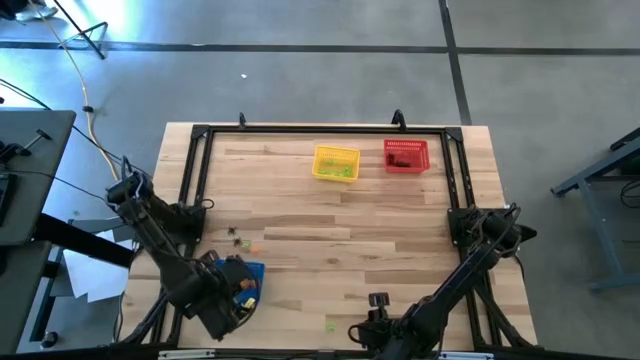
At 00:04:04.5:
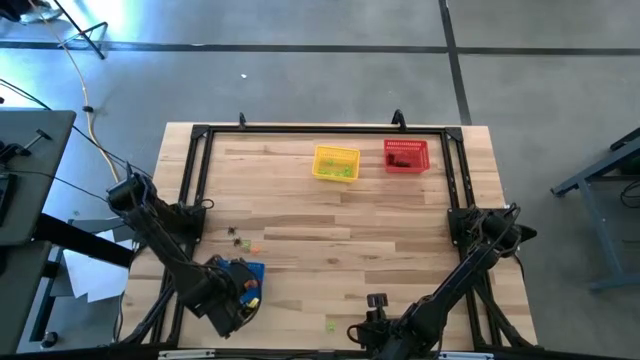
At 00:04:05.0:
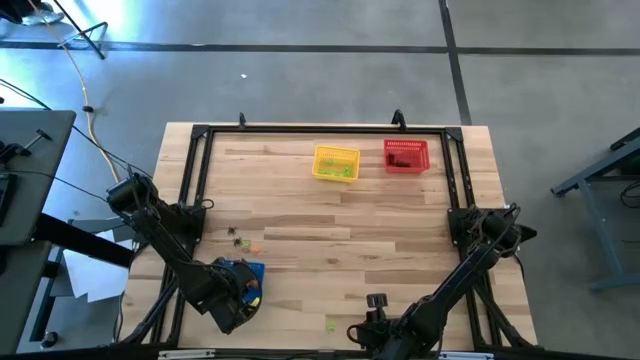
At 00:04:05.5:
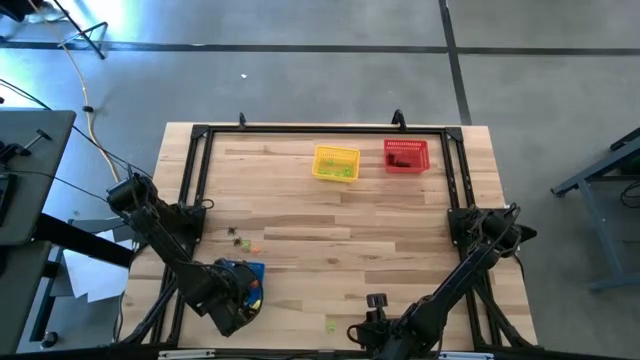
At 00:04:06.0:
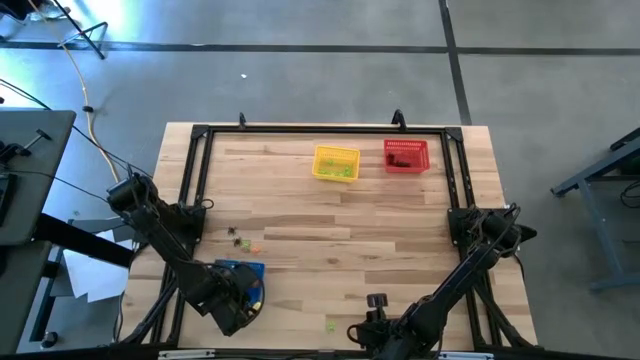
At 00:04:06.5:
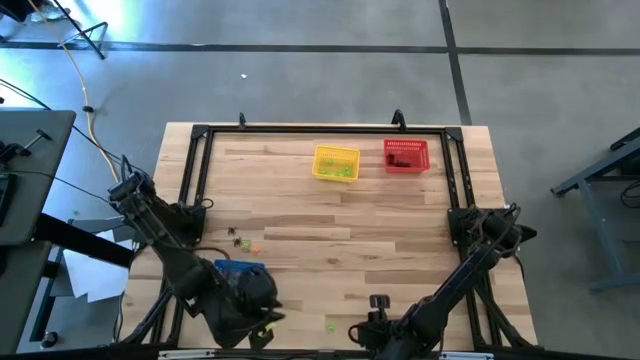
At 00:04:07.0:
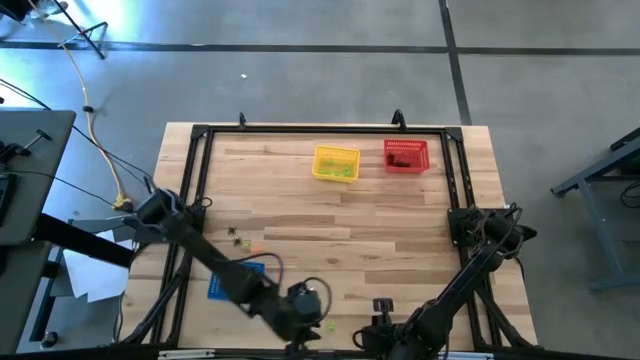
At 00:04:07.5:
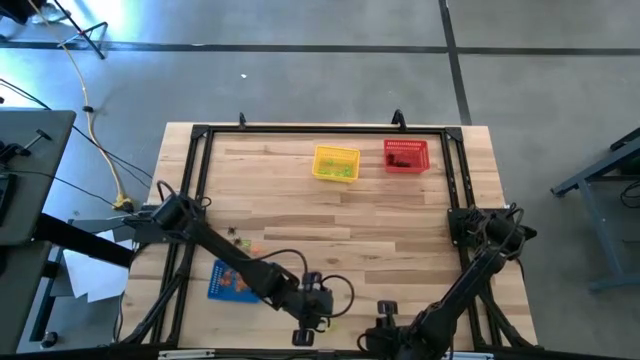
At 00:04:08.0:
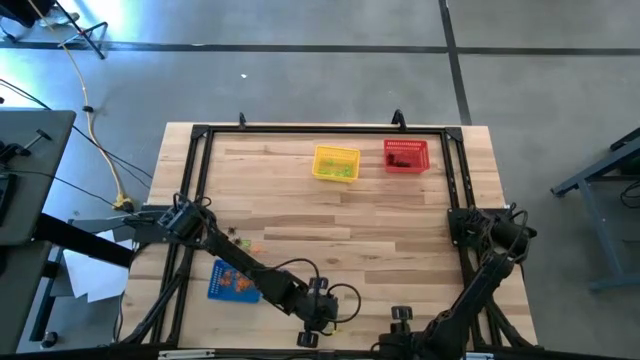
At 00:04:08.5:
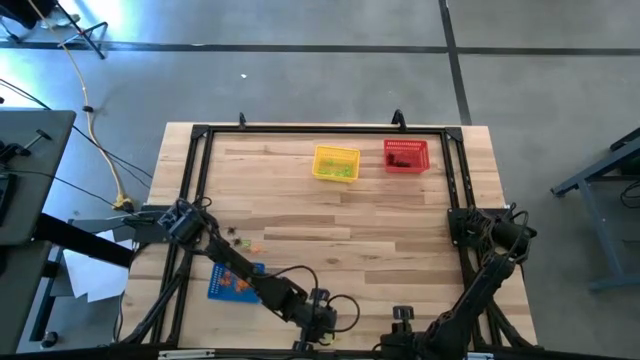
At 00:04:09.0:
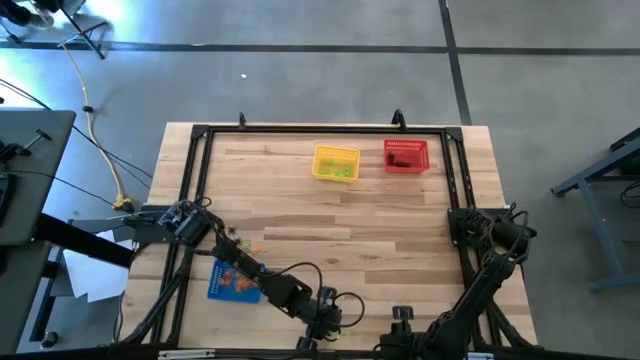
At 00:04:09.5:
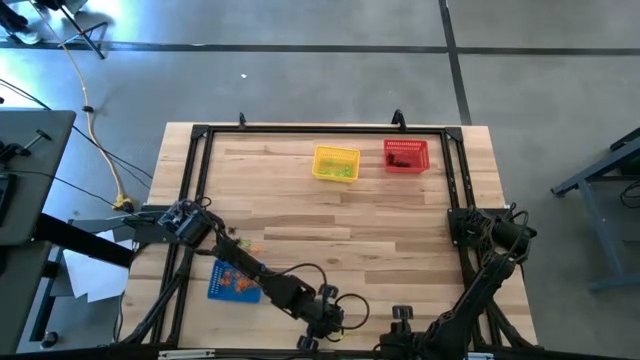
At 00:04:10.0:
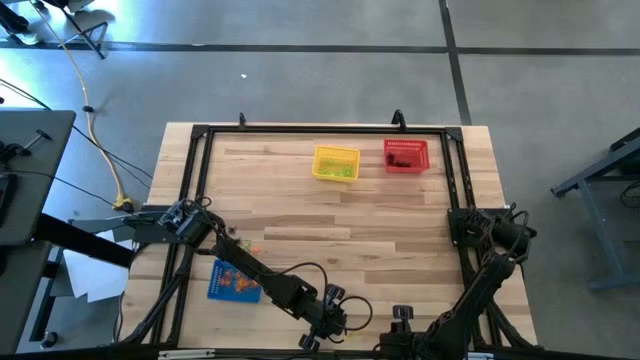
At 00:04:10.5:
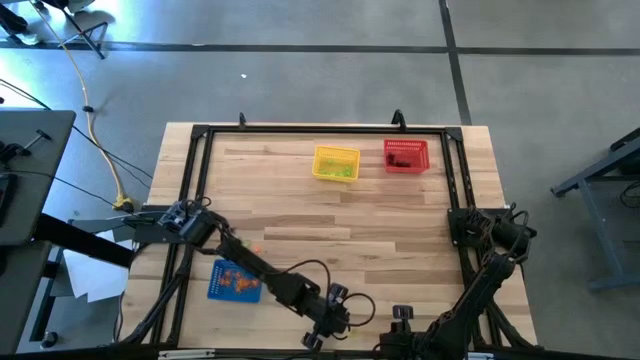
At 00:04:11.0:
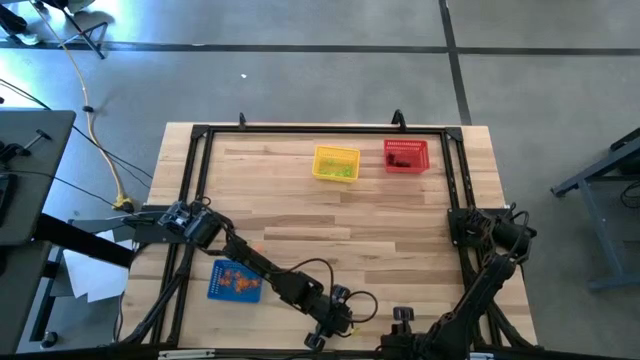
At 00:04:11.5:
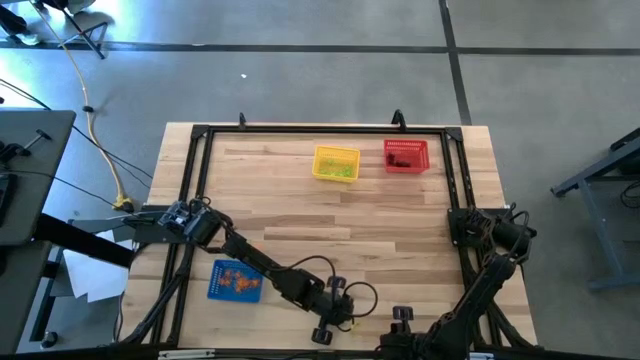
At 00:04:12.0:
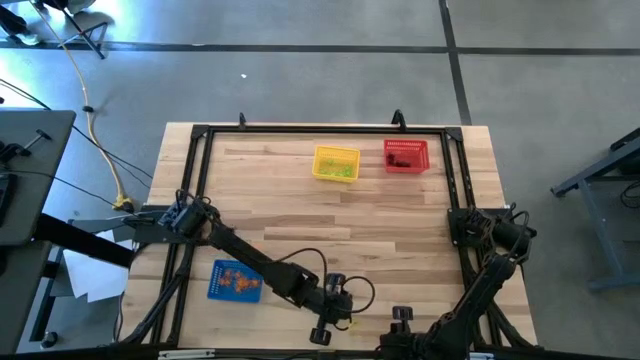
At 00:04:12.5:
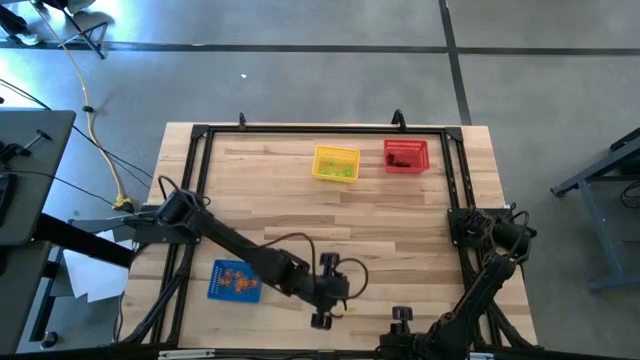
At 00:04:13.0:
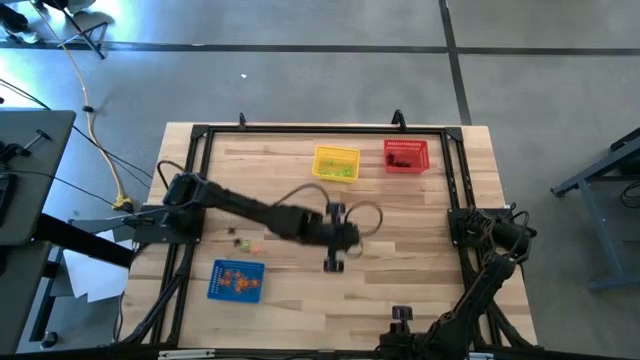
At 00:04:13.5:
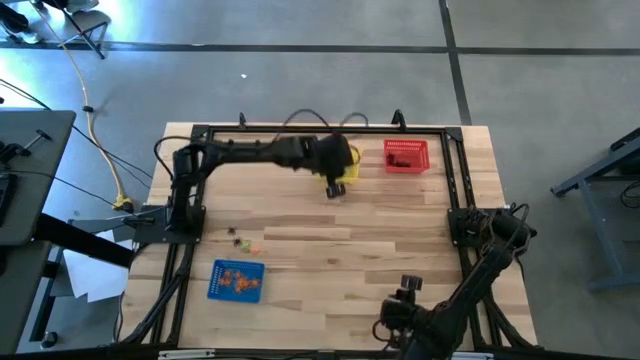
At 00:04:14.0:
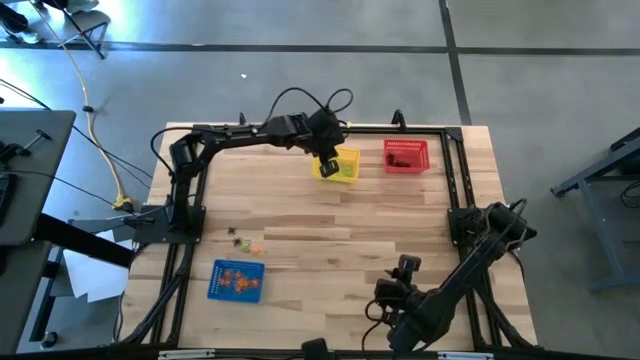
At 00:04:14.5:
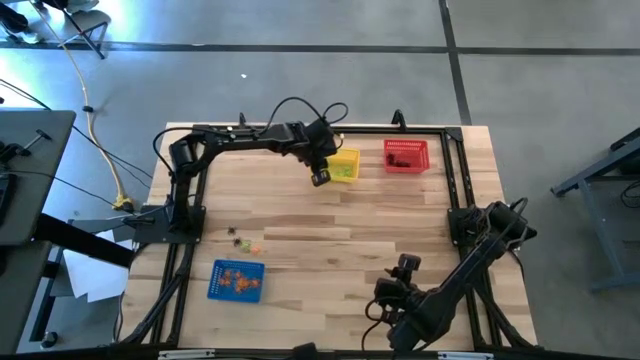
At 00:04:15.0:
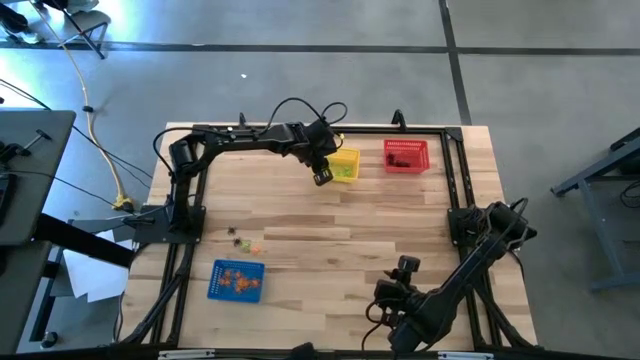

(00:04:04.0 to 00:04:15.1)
Task: Sort Halloween decoration
Put the green spider toy into the yellow bin

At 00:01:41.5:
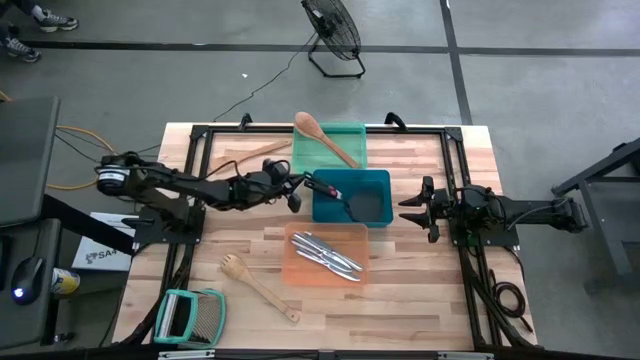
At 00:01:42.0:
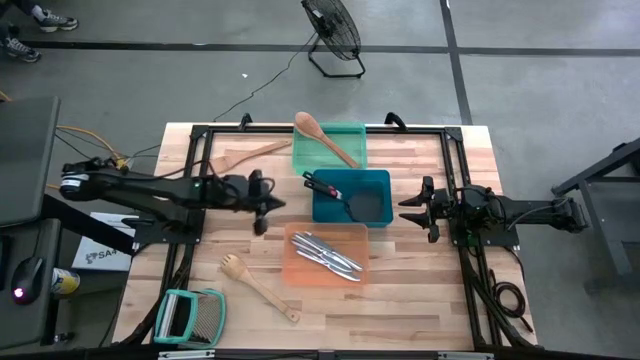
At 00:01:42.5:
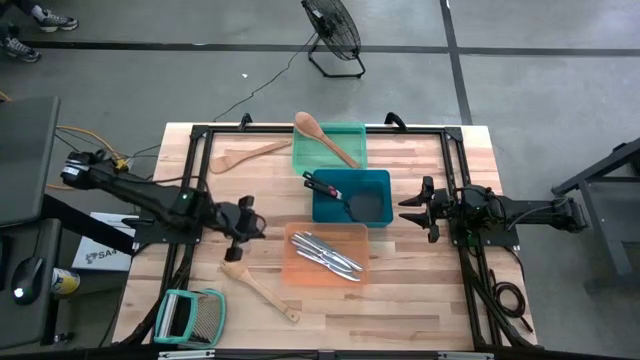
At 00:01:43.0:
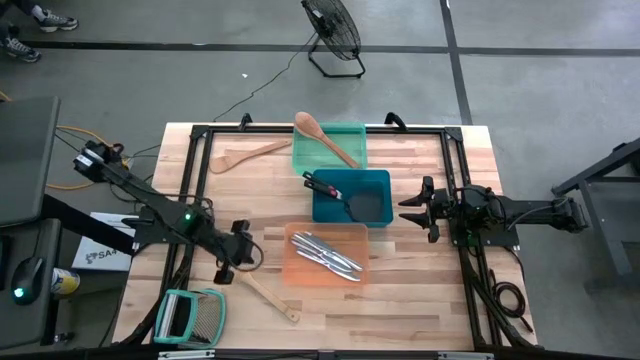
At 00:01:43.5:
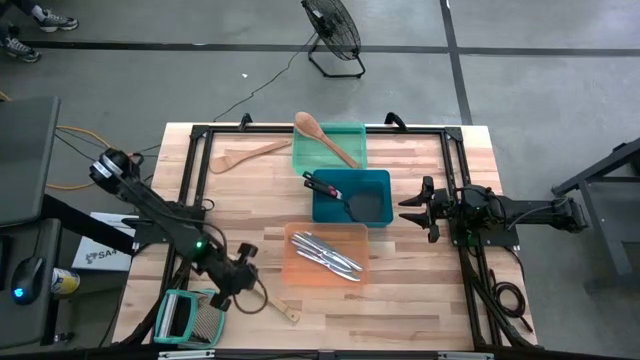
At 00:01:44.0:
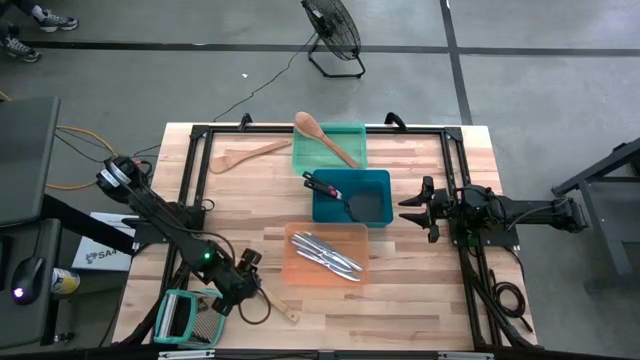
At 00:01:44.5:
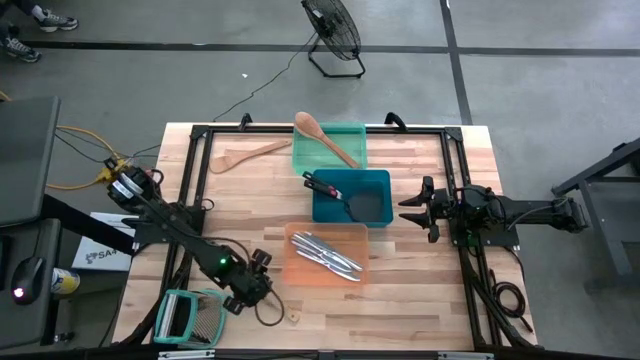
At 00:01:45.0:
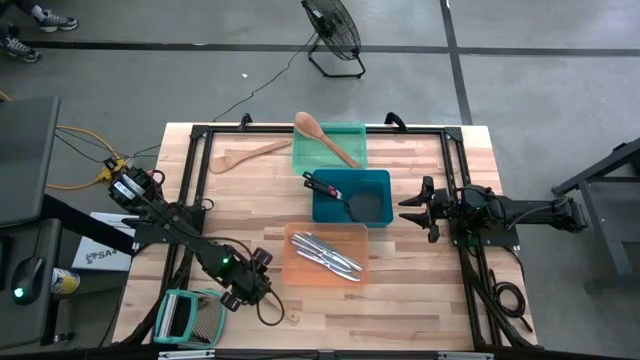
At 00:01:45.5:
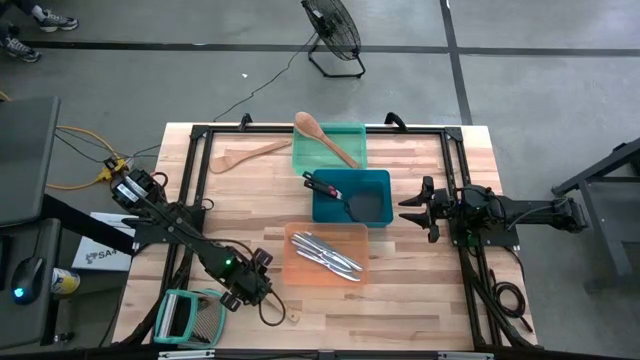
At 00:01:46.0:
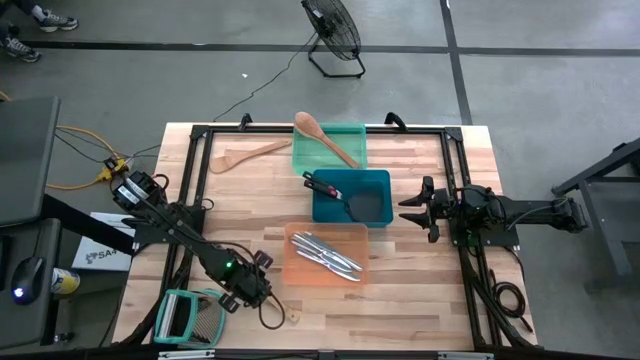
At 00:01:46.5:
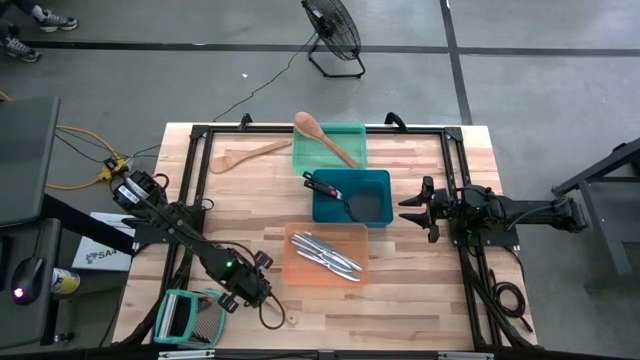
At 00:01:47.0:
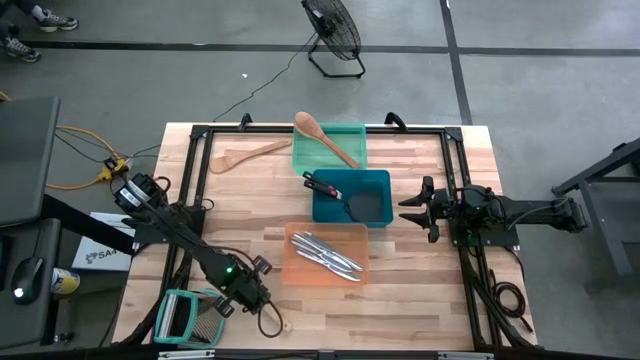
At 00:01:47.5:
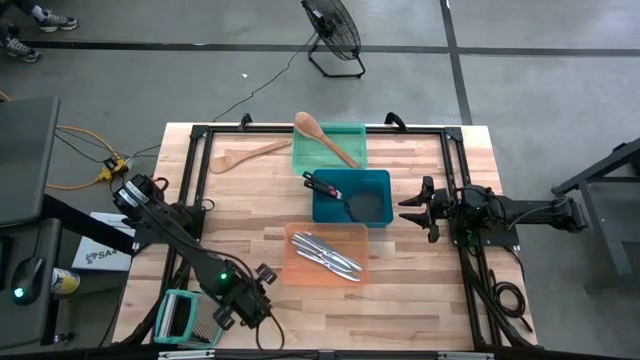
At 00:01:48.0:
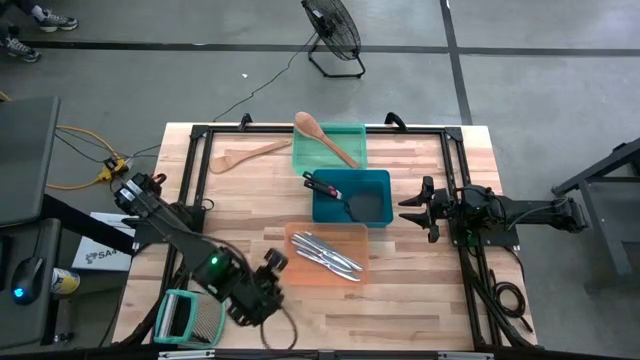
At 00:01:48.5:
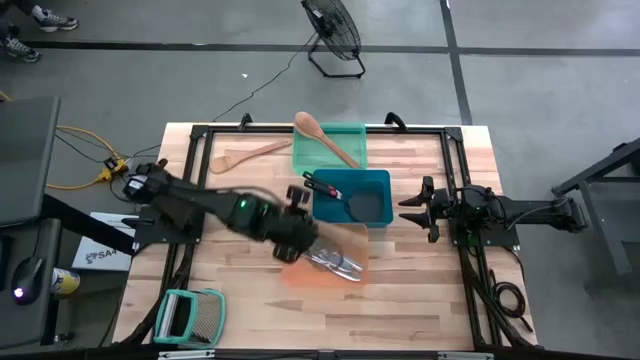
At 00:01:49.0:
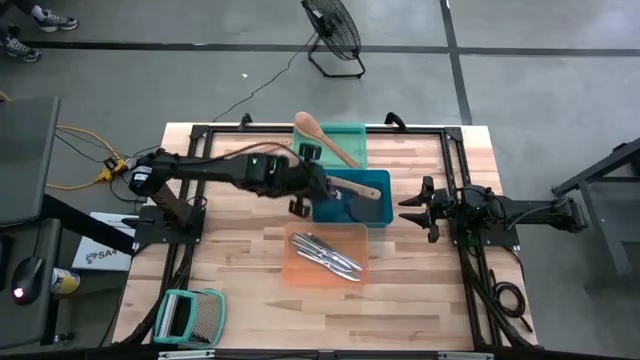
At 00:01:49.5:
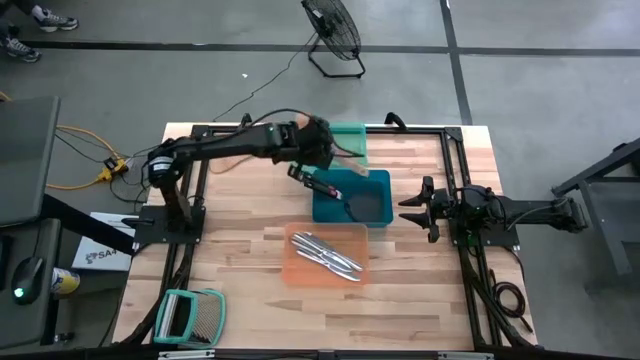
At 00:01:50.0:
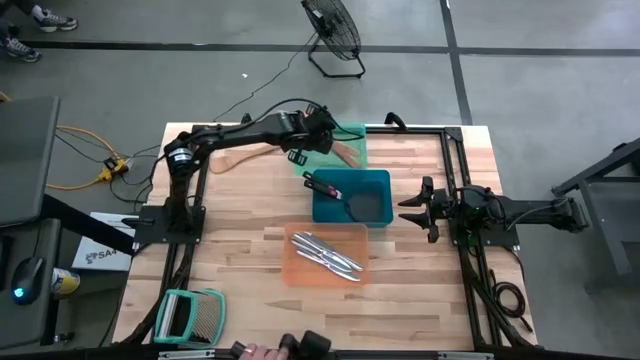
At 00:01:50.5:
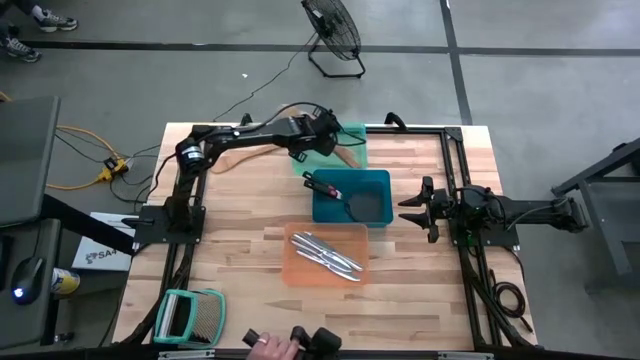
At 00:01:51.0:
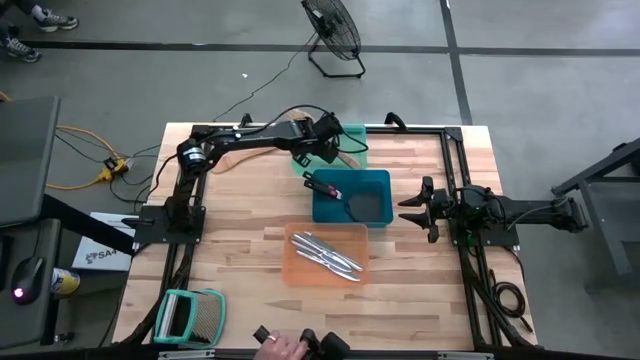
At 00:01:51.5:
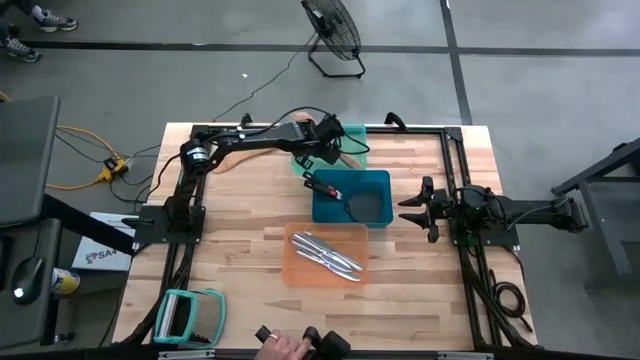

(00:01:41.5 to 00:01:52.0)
Task: Pick & Place Kitchen Items
Put the wooden serving spoon into the green bin
